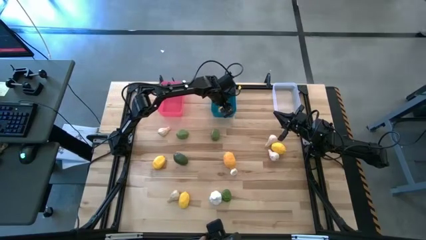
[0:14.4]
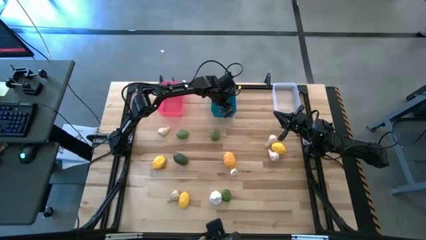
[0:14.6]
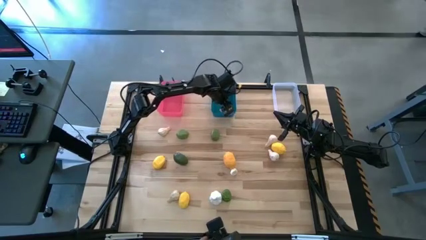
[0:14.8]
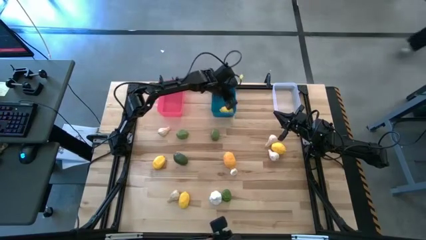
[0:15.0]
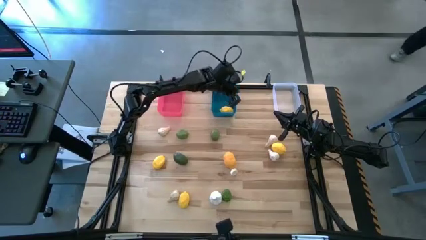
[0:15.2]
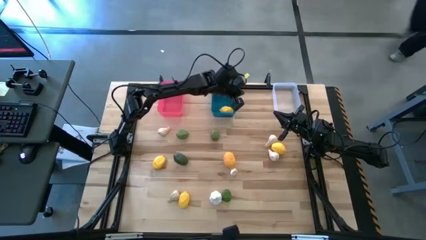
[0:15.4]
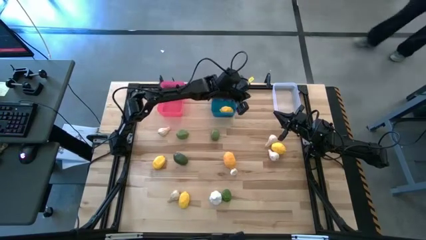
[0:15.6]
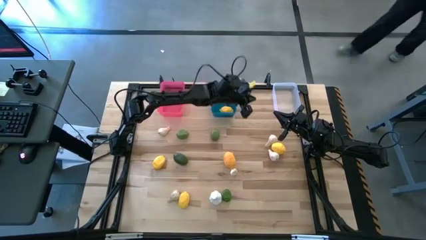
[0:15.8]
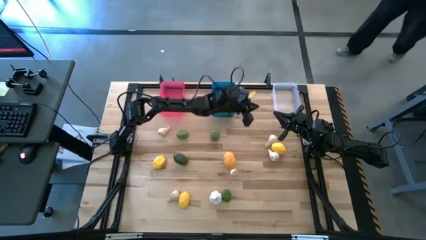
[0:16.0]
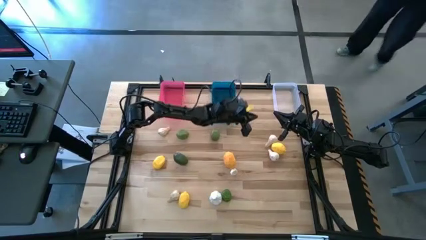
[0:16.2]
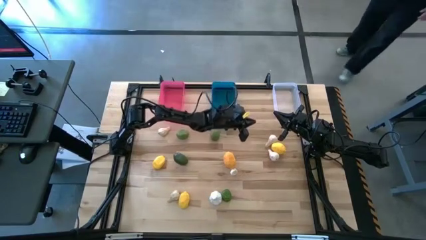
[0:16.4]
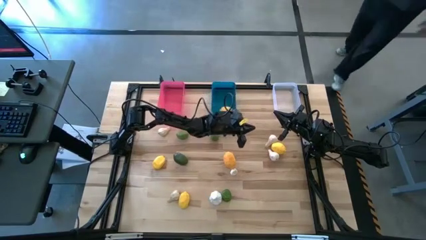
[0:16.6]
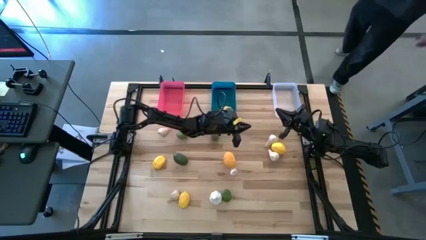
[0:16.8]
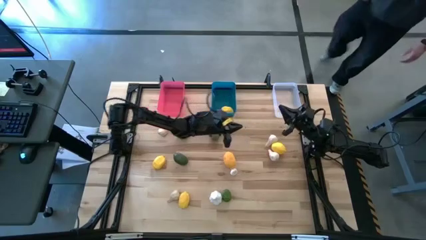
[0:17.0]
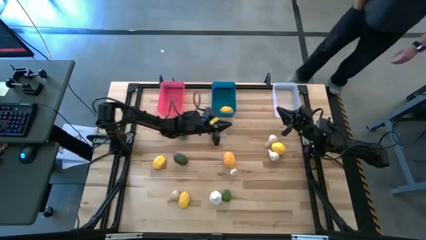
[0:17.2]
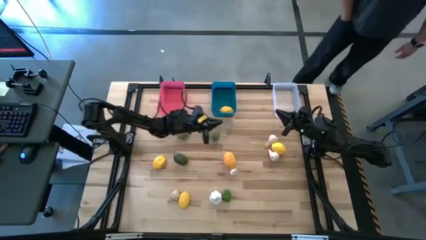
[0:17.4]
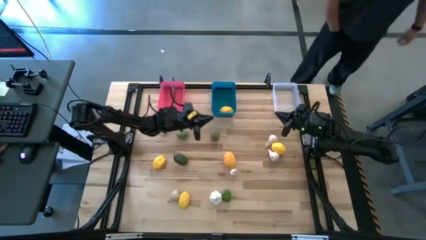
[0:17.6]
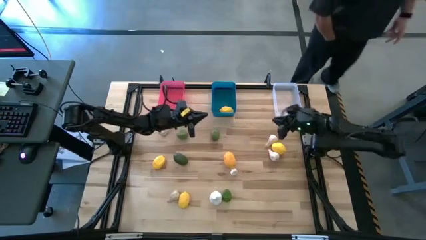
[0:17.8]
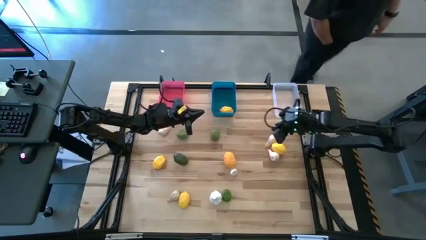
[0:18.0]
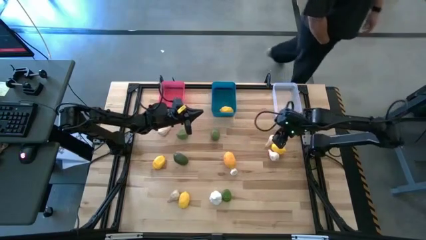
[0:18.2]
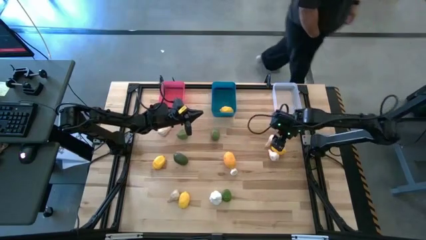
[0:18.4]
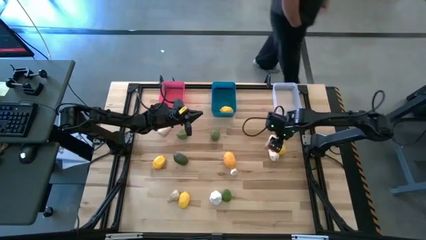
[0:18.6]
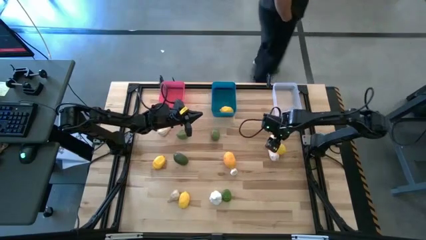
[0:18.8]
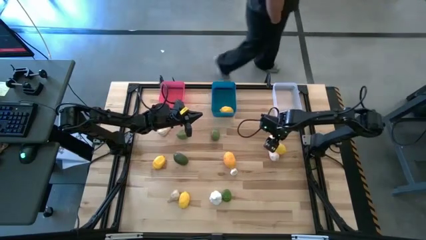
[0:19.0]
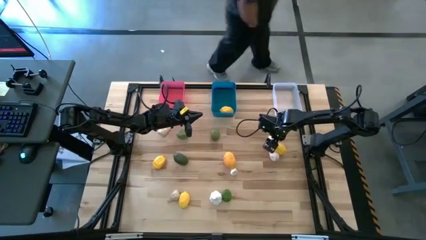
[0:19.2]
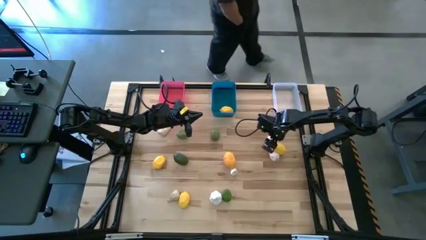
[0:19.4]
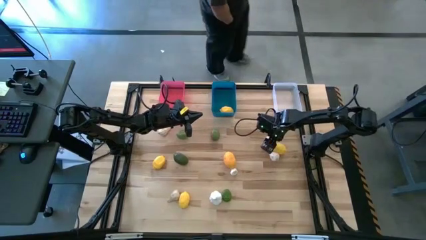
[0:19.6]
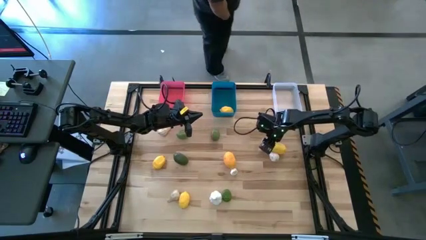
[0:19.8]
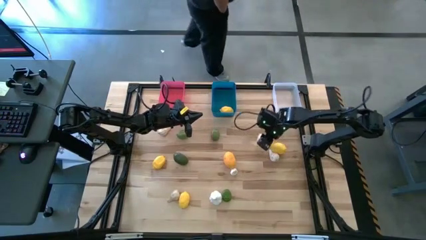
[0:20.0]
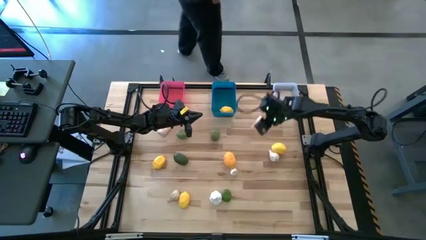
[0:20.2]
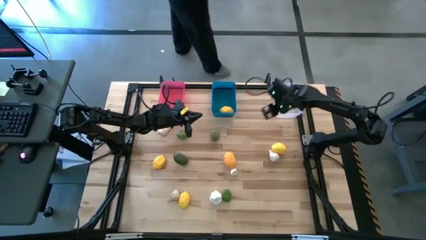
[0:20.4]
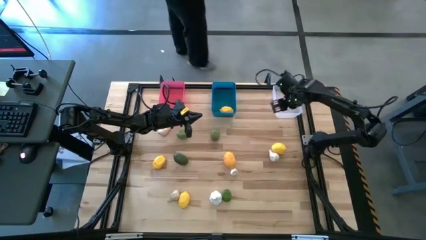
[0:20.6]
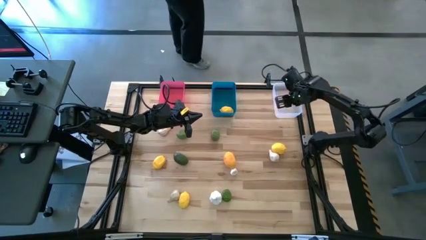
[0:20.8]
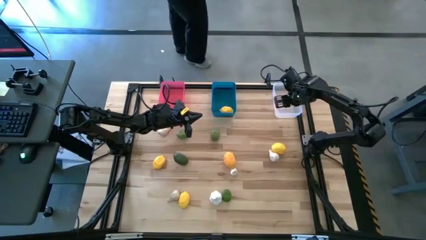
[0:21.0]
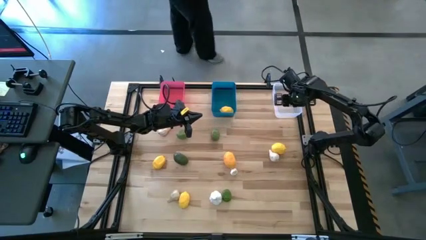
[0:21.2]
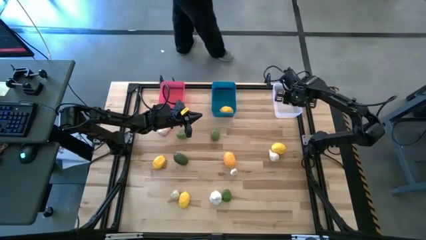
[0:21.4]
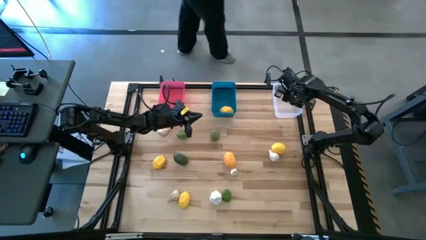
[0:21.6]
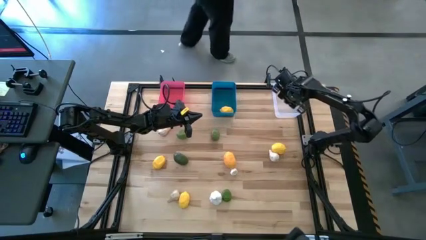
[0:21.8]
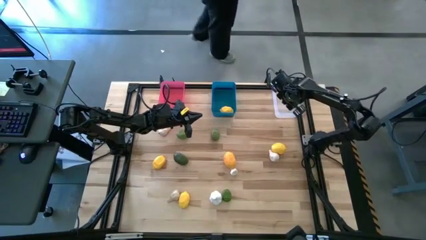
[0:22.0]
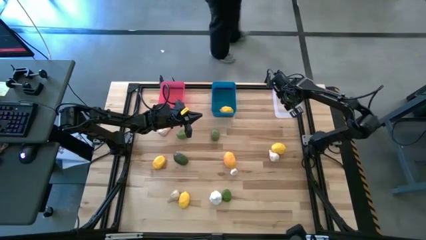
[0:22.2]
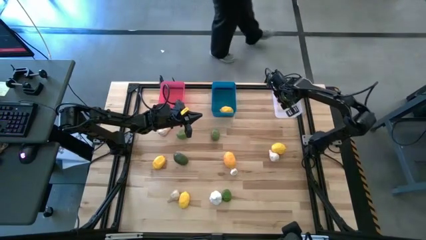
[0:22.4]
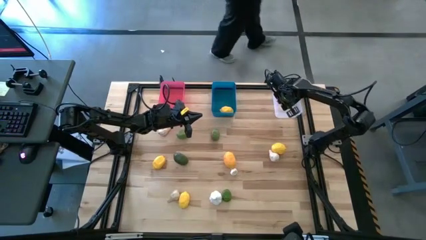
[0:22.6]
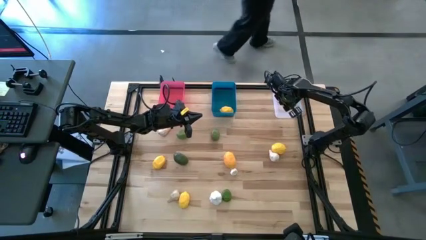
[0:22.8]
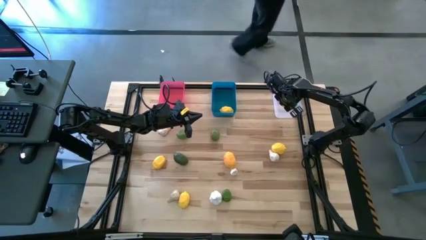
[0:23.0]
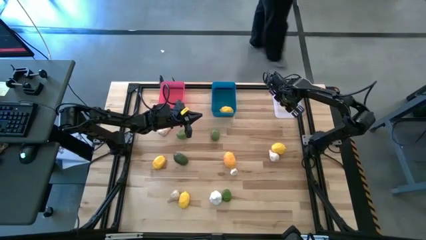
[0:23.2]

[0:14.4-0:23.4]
Task: Sort produce into baskets
Put the garlic into the white bin

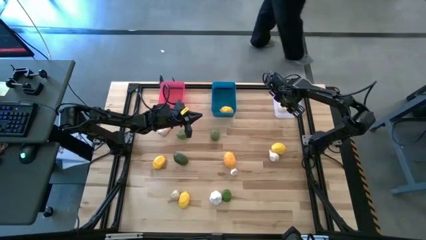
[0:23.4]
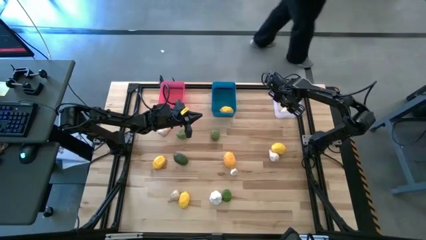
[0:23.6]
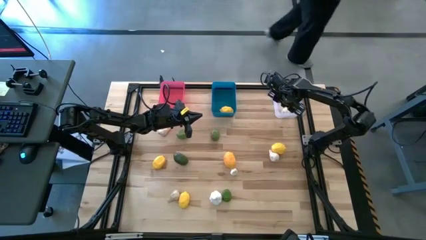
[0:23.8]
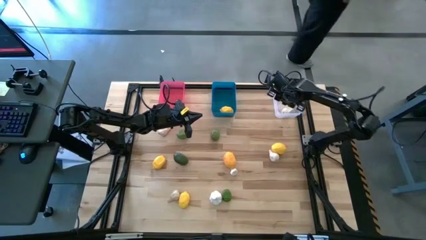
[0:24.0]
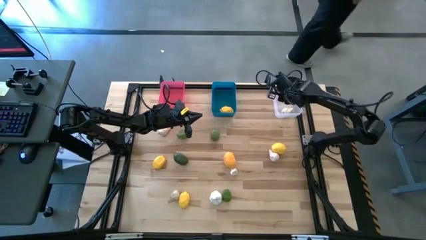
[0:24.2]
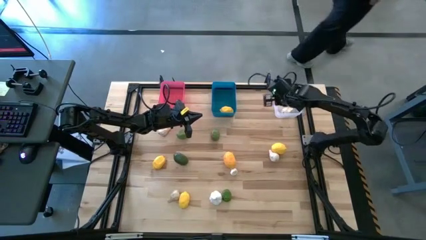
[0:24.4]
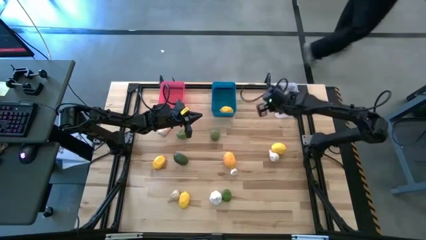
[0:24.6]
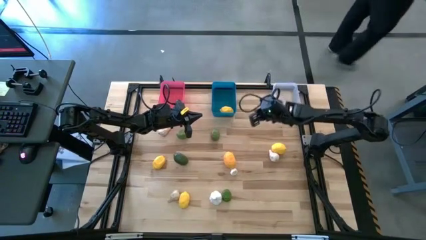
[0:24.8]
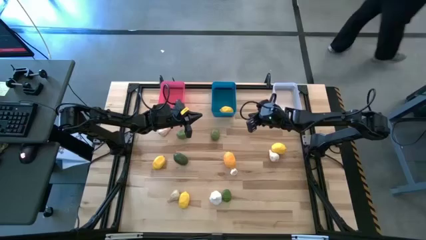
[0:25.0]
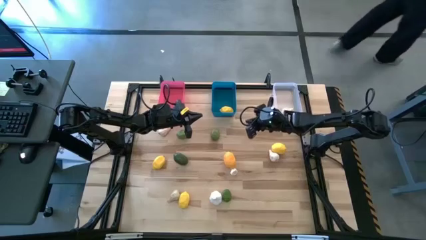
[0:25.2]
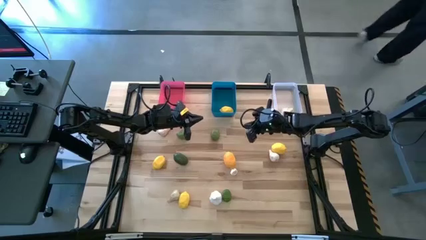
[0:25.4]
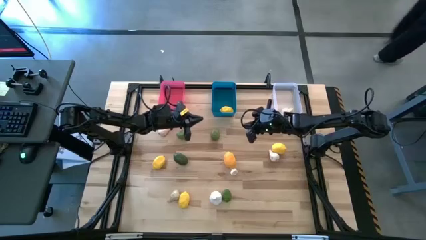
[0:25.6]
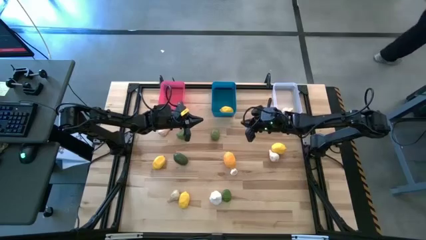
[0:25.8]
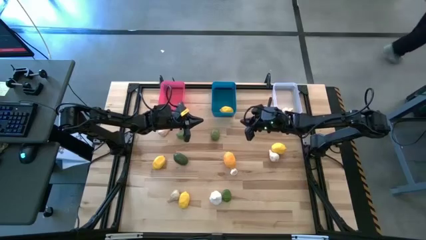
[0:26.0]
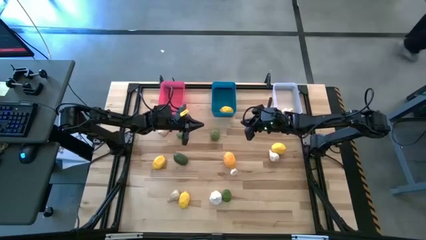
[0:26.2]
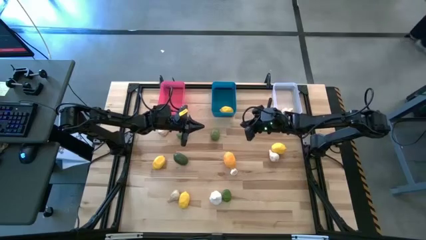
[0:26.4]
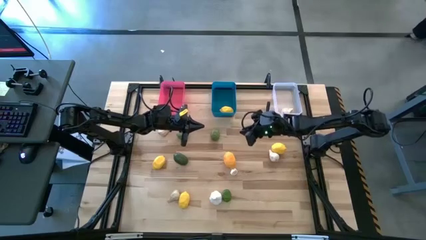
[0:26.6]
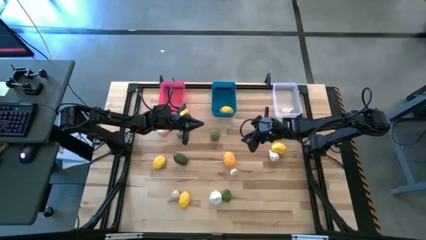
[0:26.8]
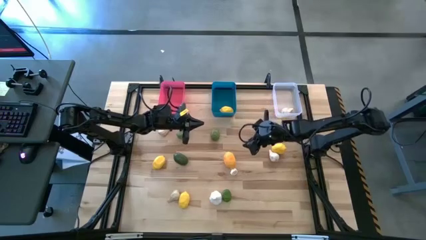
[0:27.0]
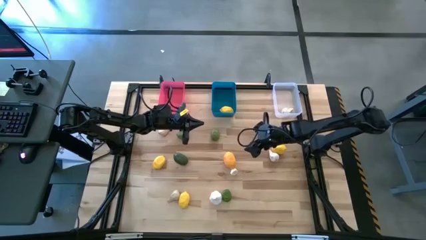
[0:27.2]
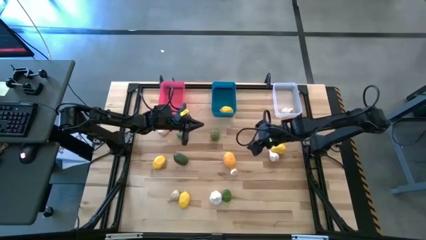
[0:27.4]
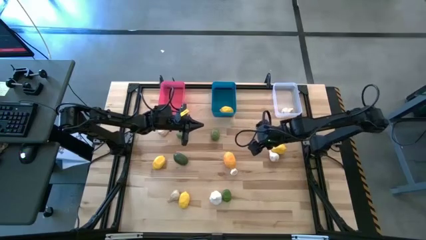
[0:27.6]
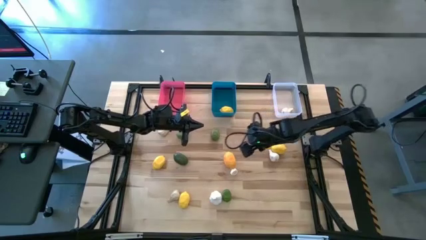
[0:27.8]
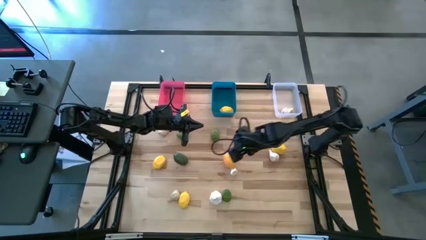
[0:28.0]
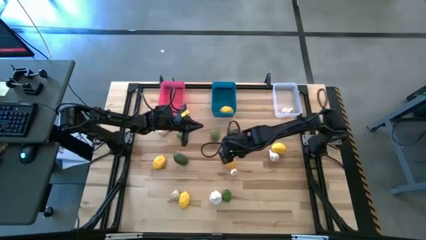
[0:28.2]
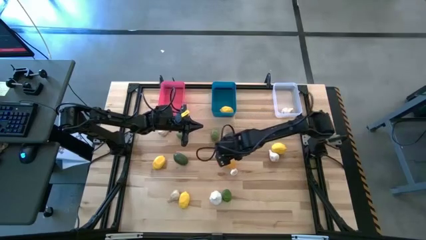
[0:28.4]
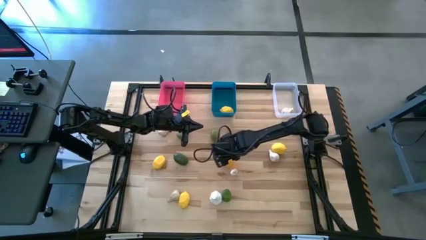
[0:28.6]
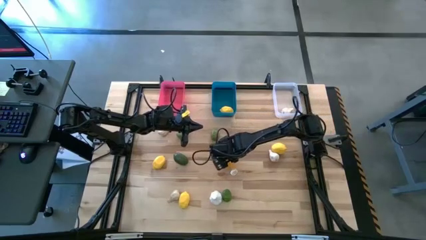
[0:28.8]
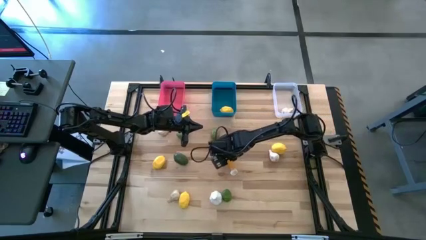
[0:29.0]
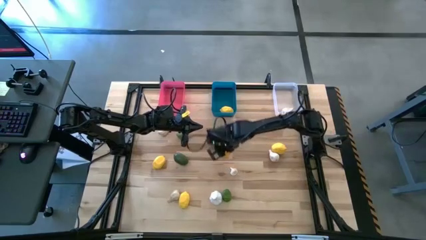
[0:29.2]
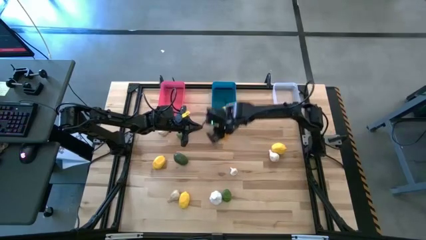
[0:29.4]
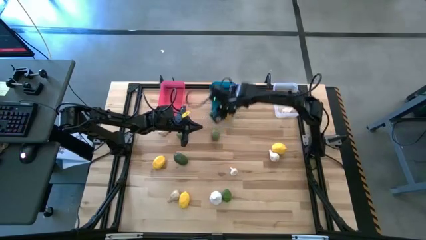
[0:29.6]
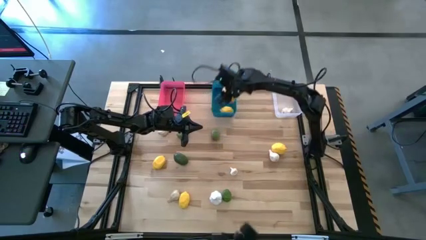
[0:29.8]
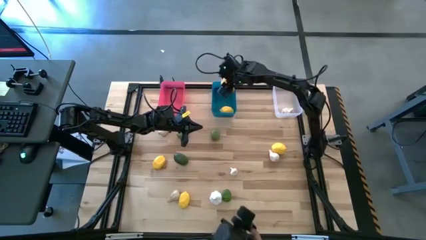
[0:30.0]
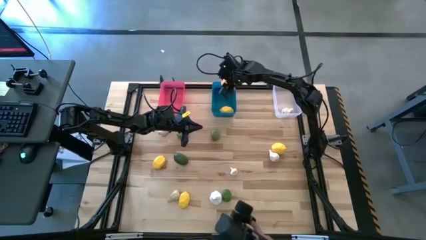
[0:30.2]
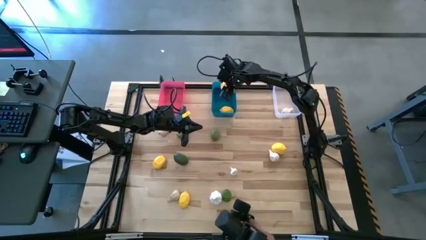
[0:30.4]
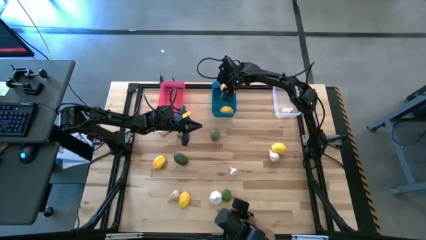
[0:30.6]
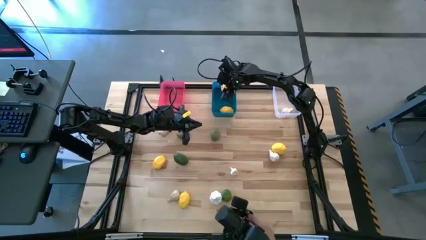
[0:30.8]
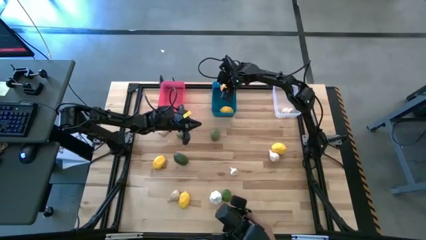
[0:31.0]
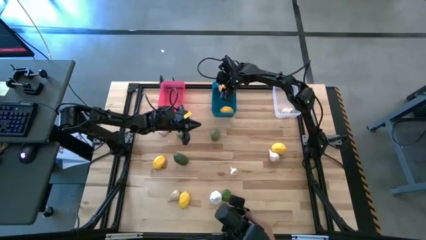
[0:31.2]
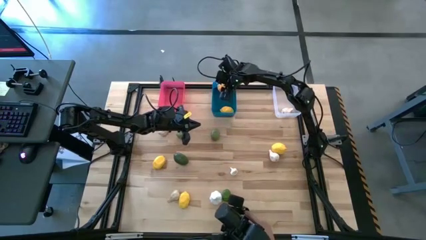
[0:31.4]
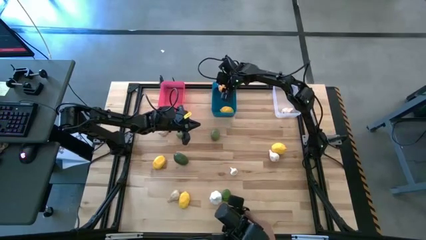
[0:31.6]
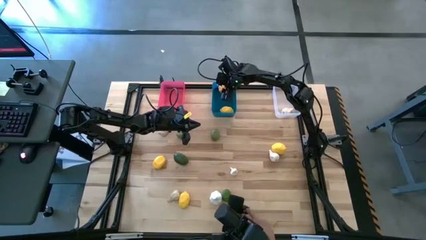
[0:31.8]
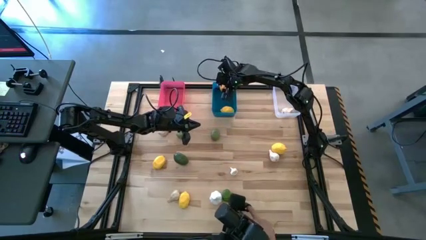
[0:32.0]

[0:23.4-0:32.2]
Put the lemon into the blue bin
